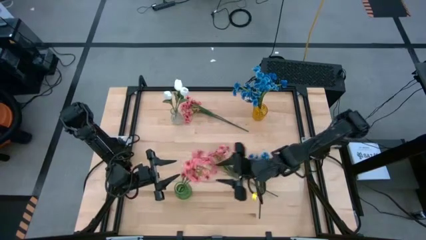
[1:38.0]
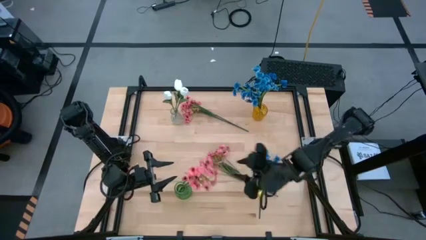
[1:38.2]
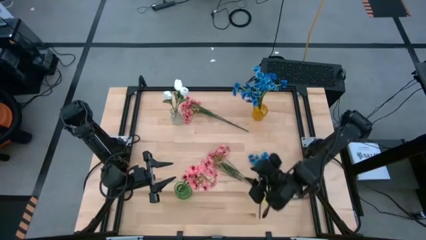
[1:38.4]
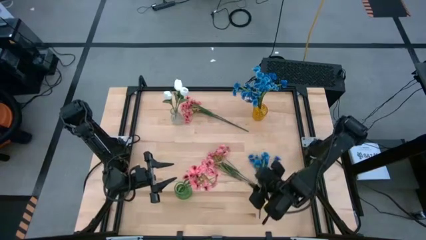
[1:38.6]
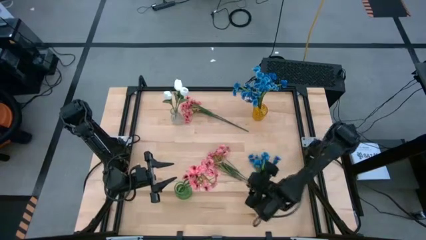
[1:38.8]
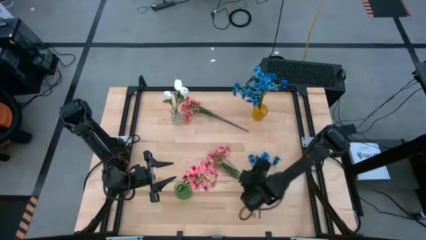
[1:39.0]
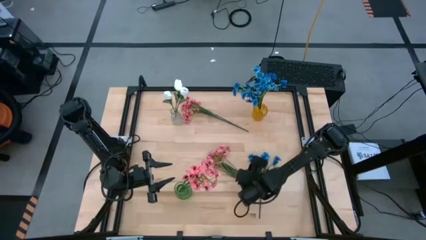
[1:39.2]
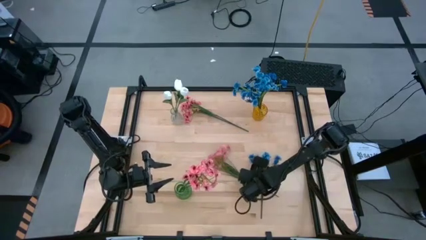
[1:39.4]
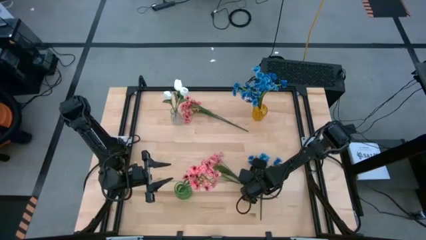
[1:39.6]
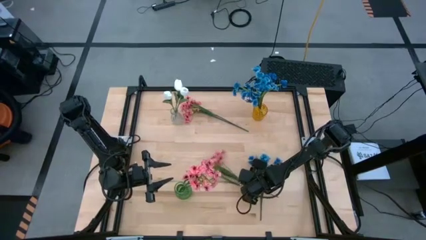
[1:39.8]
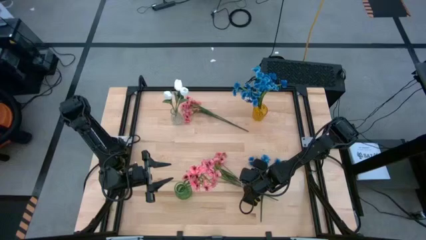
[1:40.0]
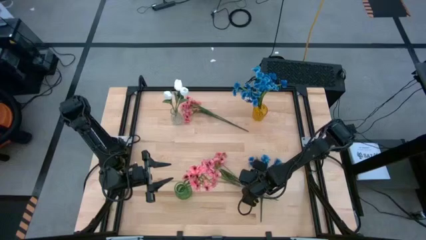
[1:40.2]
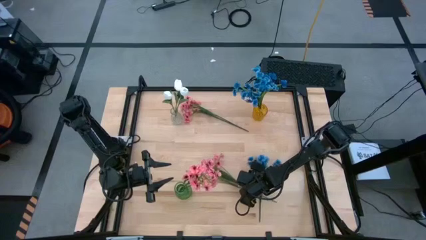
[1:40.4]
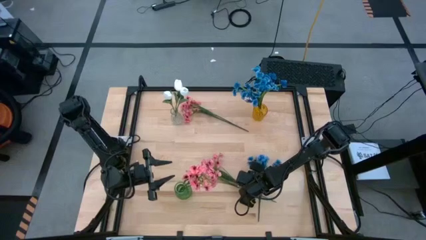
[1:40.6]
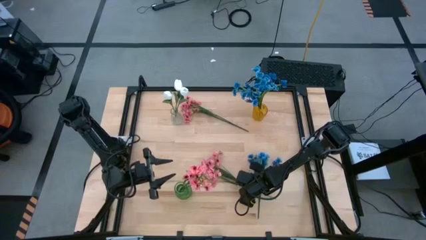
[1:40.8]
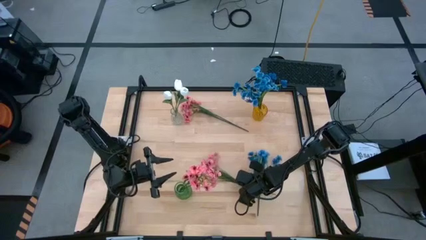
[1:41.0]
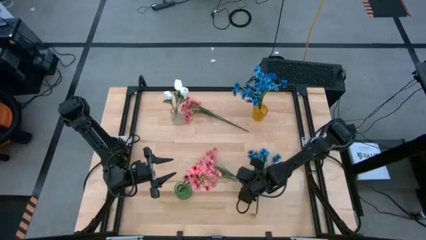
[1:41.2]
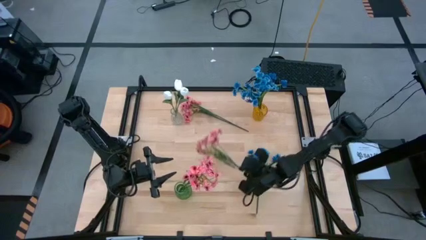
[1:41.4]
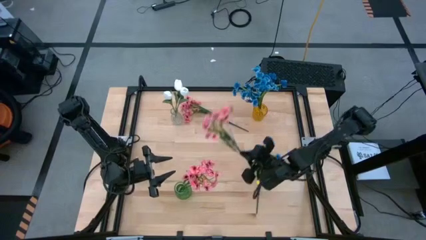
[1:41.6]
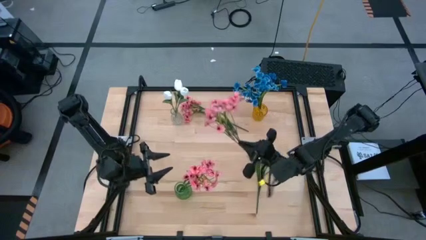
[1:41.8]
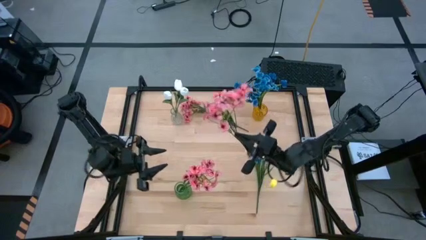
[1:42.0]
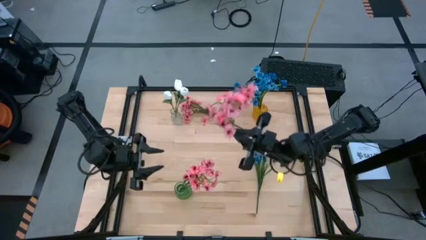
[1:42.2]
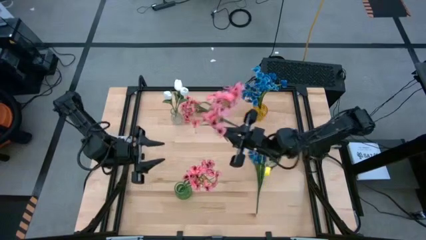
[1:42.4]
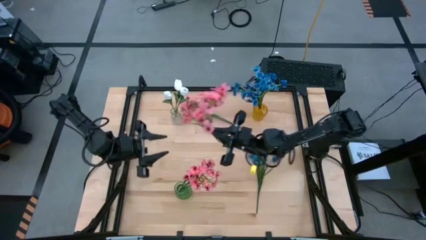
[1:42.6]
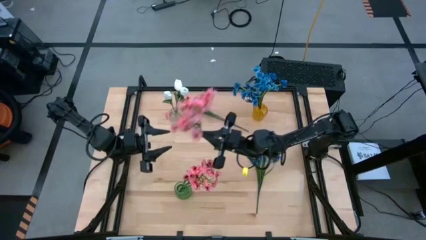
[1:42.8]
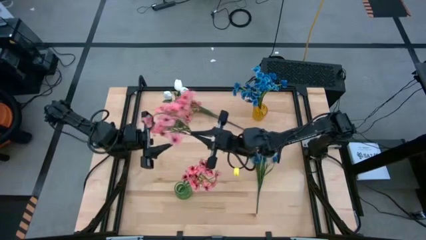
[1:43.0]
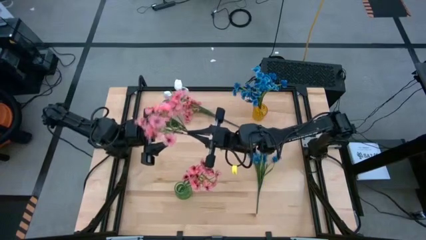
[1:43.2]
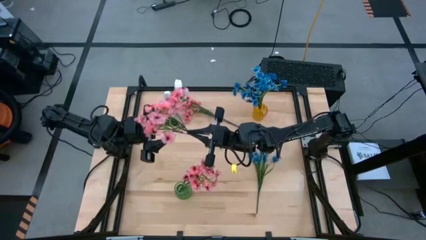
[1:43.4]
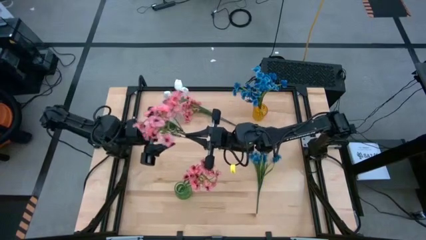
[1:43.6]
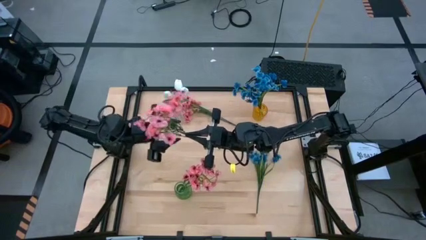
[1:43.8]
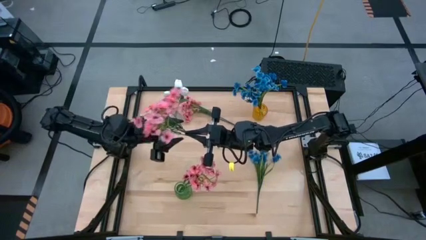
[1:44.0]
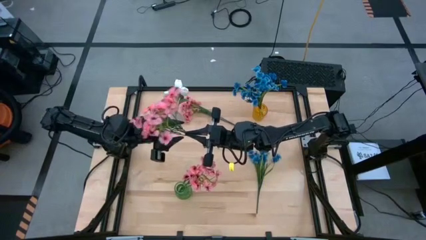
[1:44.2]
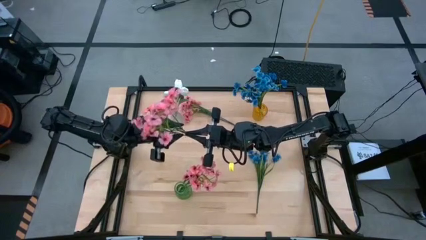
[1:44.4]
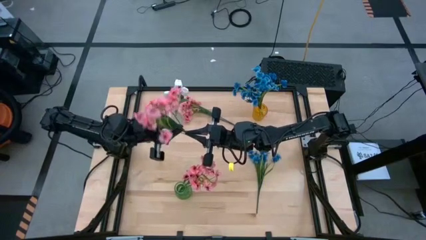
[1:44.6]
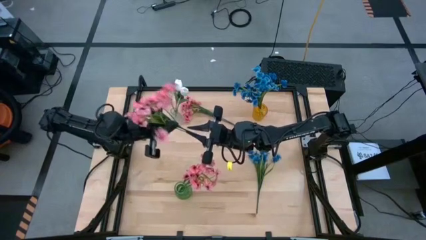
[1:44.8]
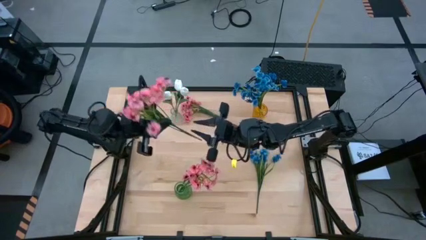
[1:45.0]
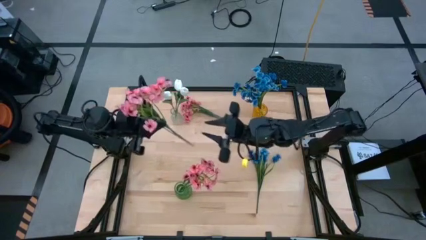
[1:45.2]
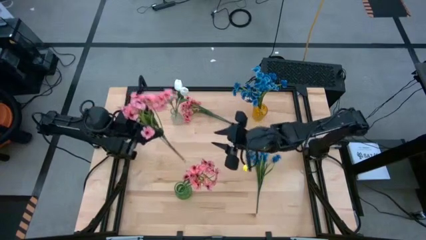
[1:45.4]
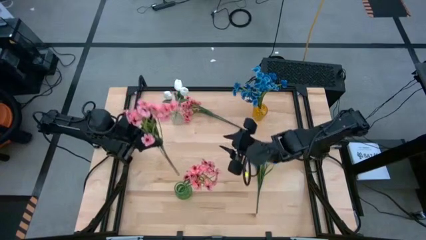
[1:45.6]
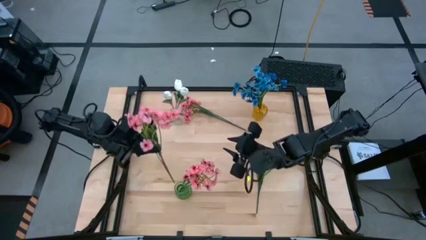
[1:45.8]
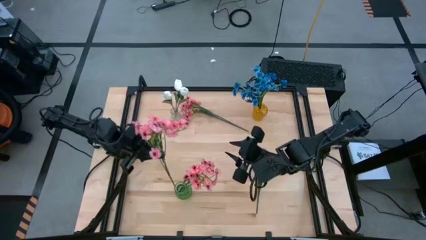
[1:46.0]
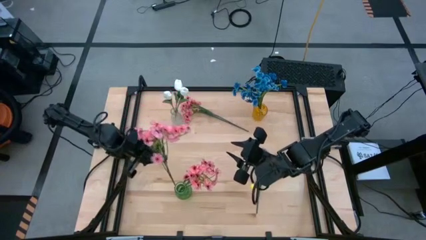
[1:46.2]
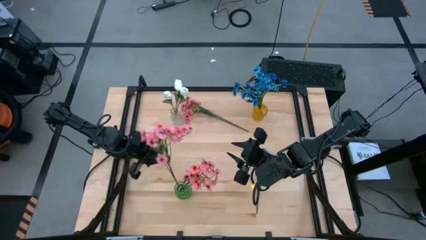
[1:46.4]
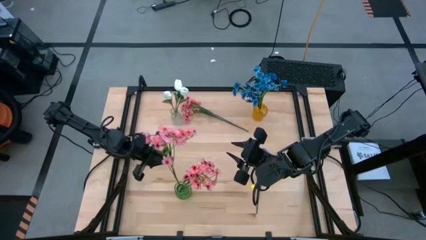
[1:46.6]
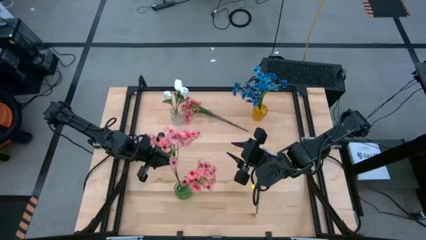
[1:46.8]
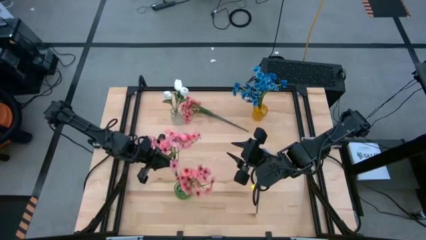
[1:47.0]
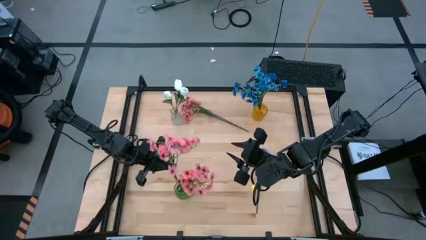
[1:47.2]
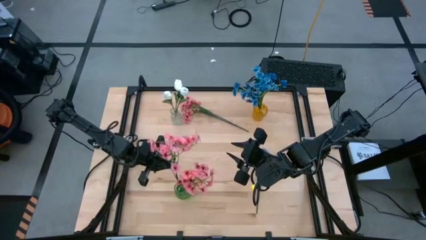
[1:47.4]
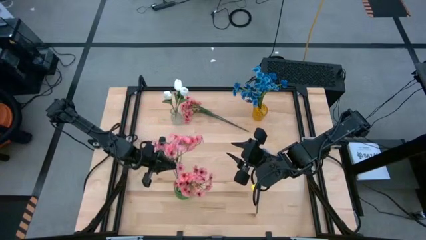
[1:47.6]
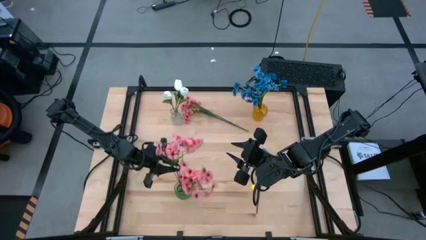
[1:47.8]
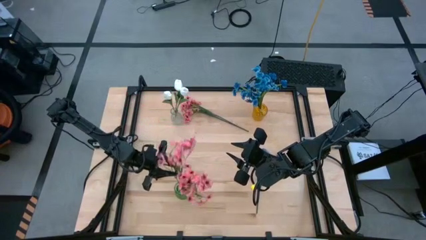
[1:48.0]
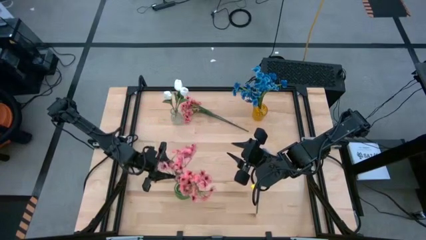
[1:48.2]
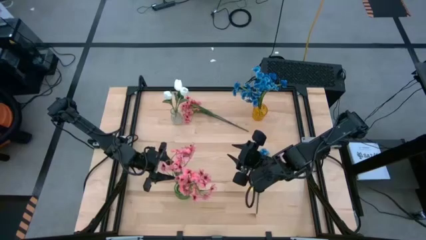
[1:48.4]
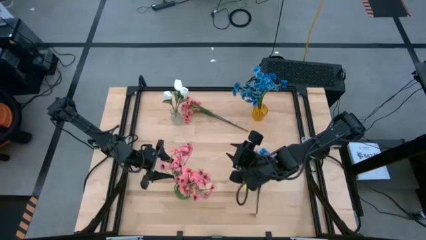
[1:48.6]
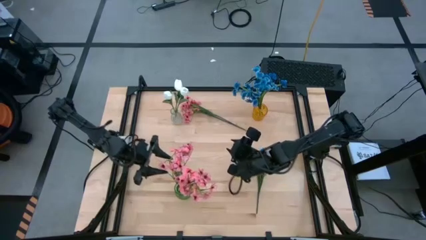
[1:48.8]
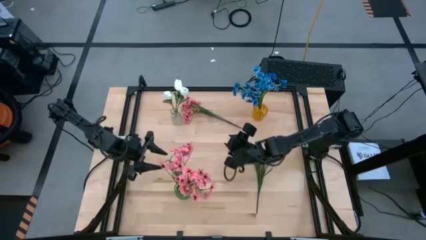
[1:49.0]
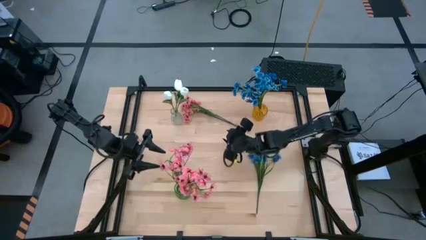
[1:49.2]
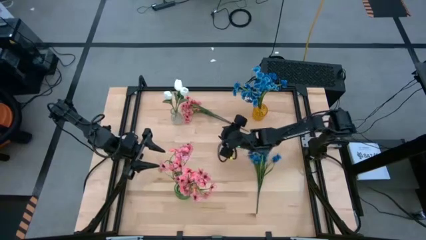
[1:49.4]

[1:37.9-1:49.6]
Task: Sort flowers into vase by color
Put the bottom pink flowers into the green vase
